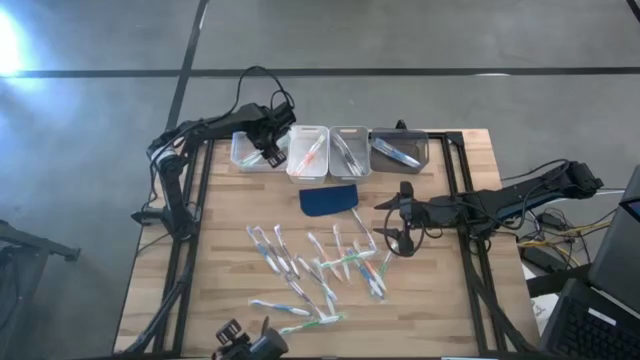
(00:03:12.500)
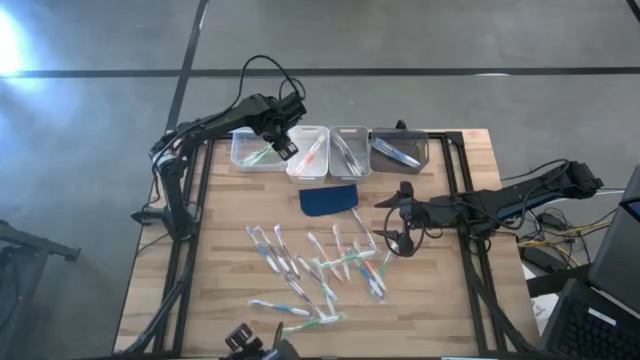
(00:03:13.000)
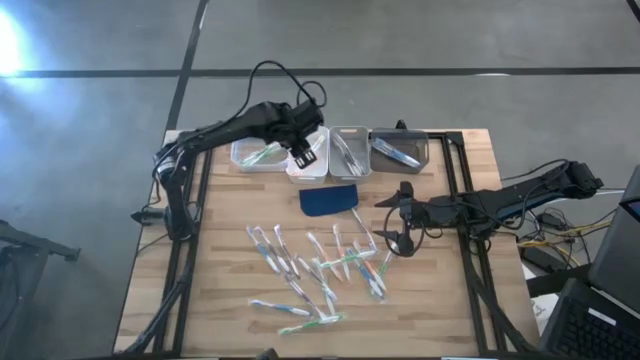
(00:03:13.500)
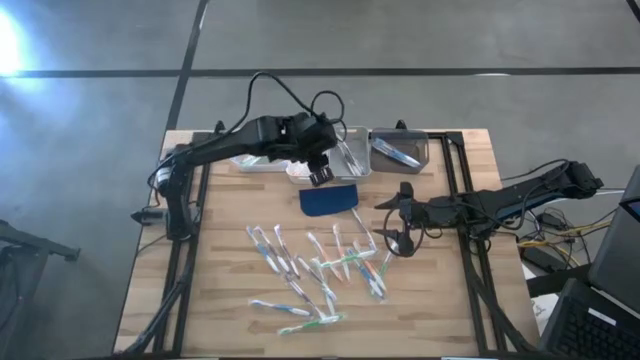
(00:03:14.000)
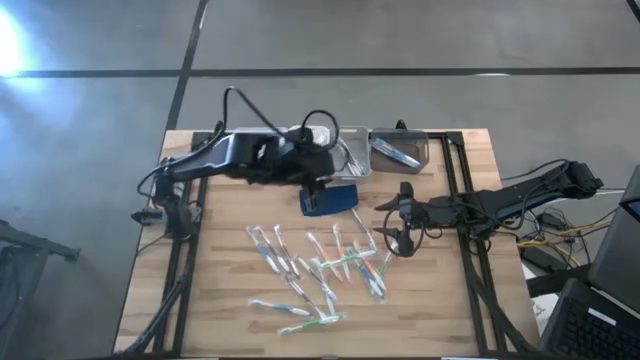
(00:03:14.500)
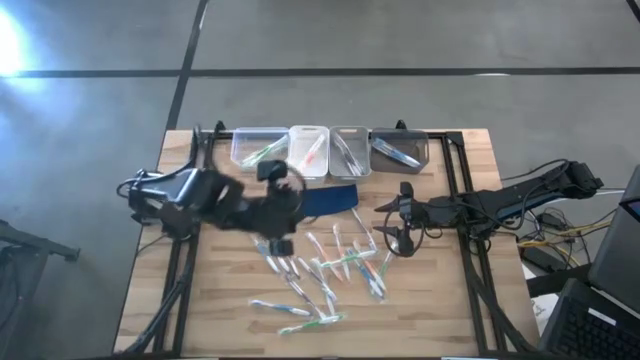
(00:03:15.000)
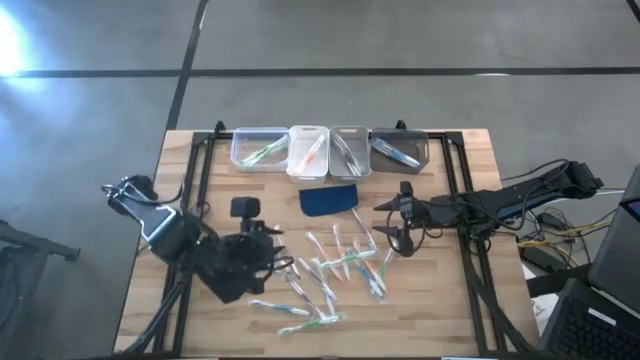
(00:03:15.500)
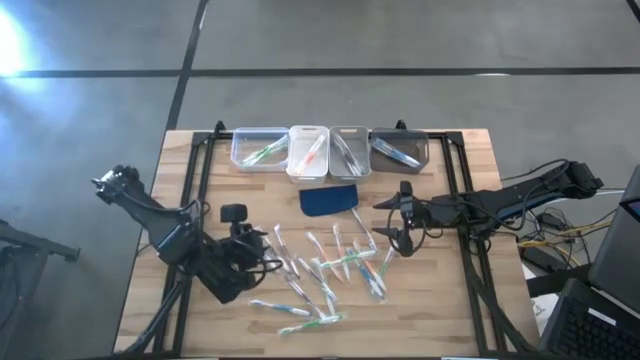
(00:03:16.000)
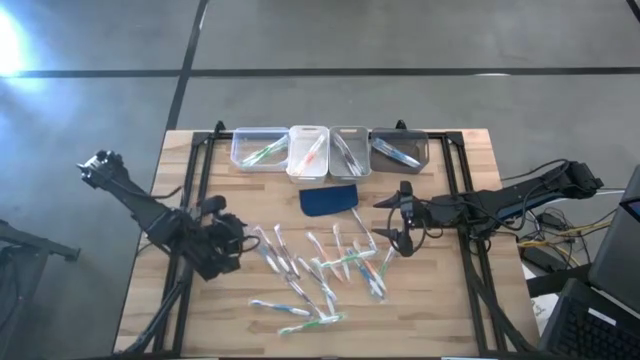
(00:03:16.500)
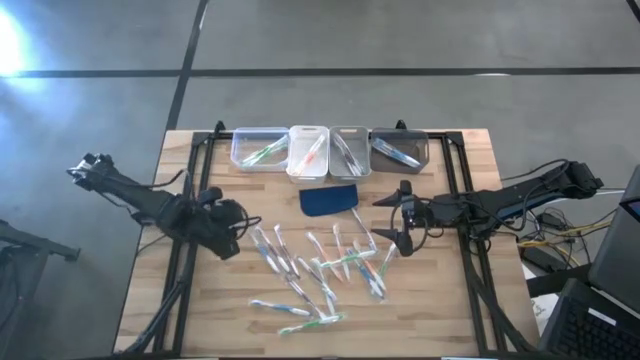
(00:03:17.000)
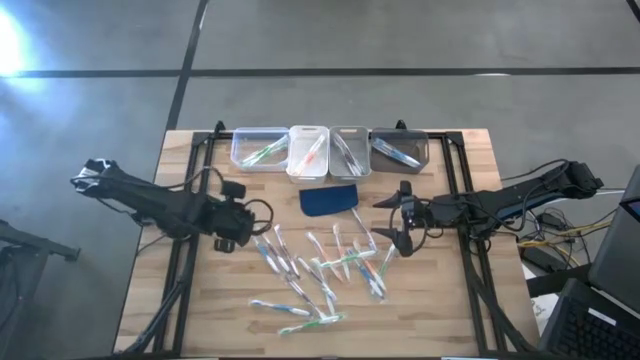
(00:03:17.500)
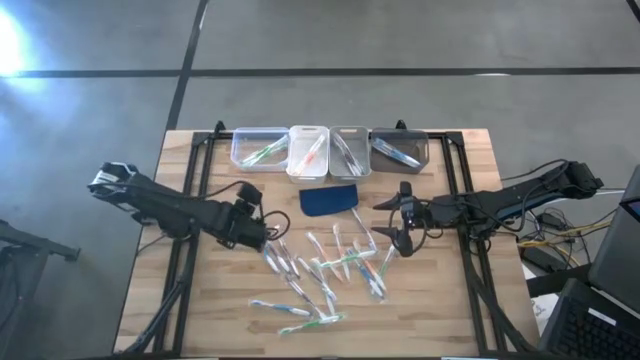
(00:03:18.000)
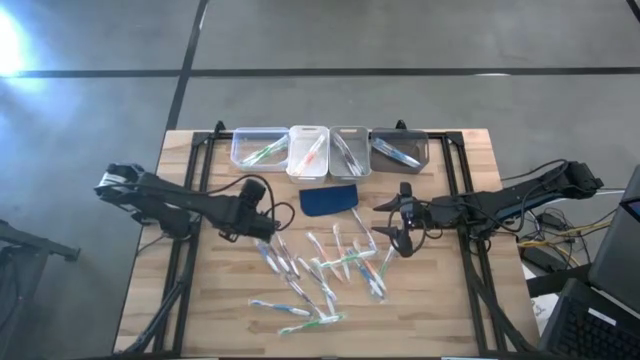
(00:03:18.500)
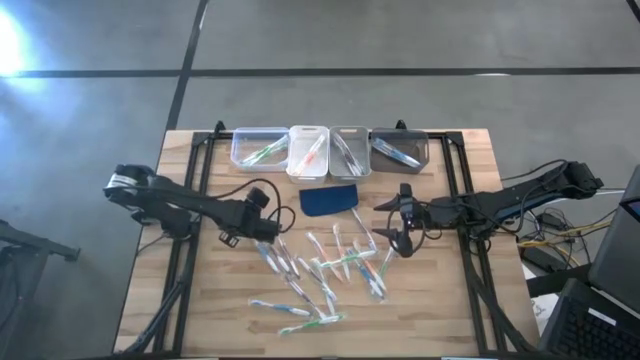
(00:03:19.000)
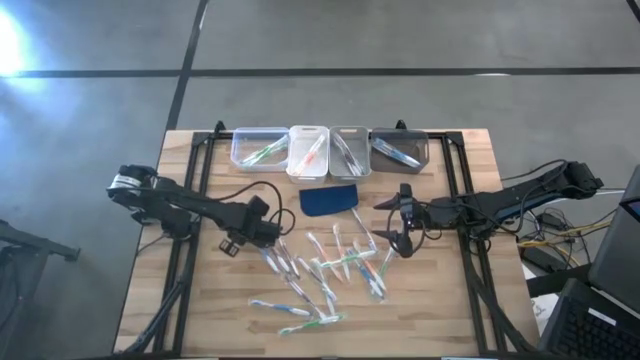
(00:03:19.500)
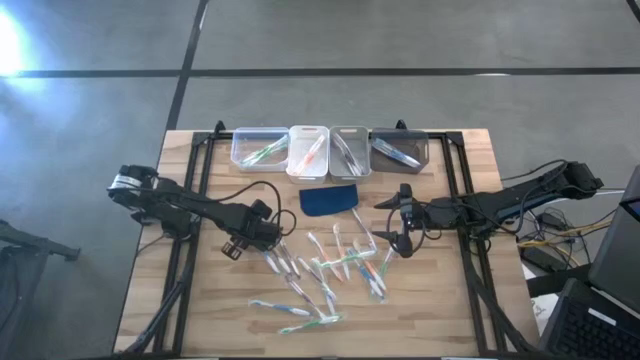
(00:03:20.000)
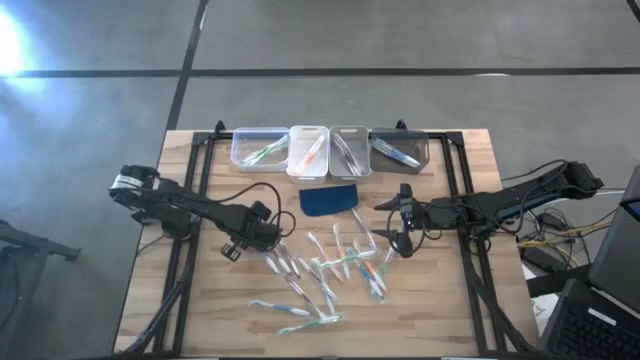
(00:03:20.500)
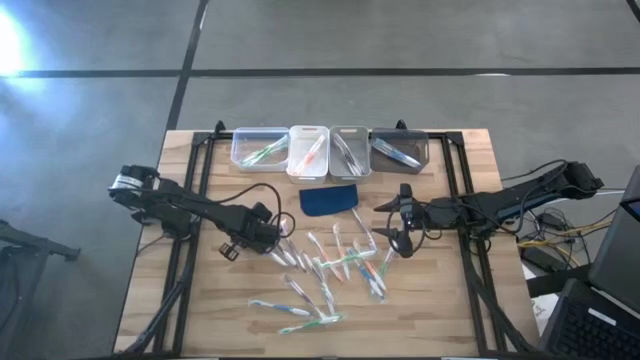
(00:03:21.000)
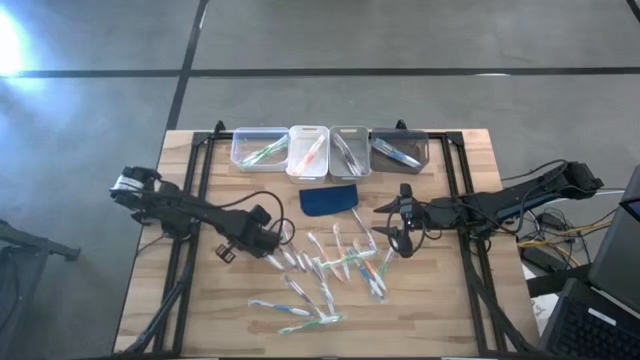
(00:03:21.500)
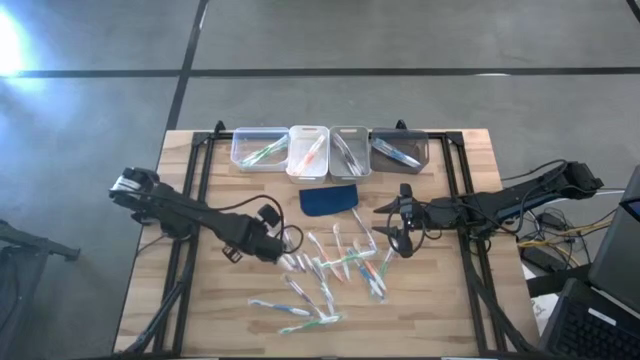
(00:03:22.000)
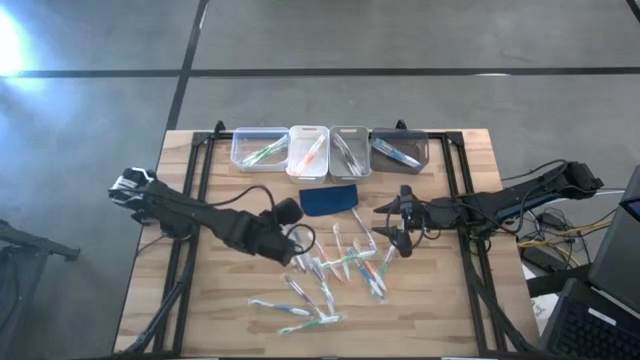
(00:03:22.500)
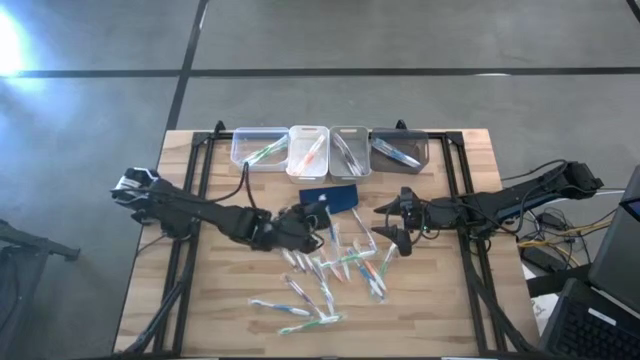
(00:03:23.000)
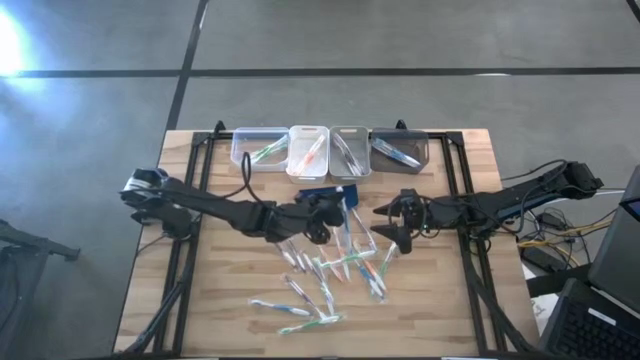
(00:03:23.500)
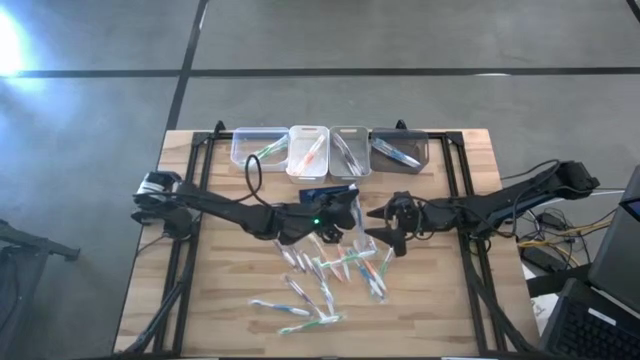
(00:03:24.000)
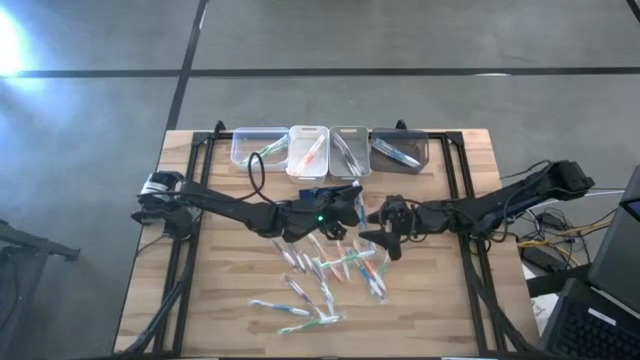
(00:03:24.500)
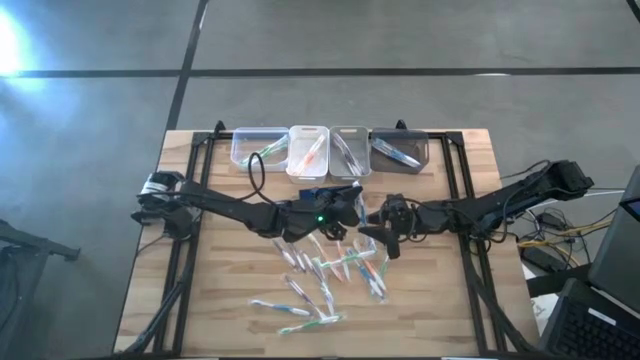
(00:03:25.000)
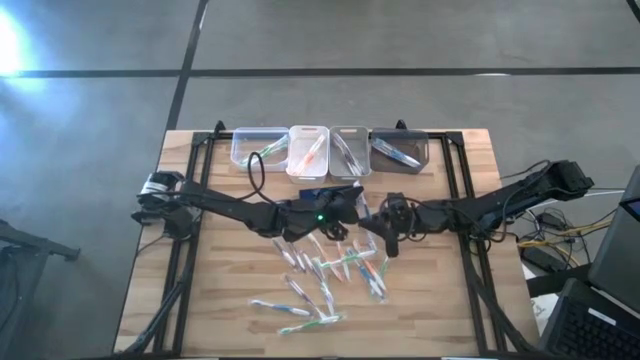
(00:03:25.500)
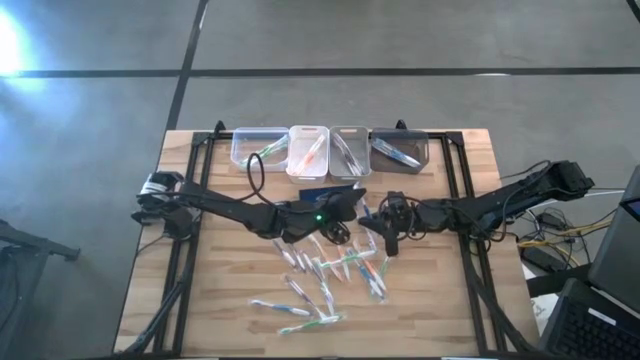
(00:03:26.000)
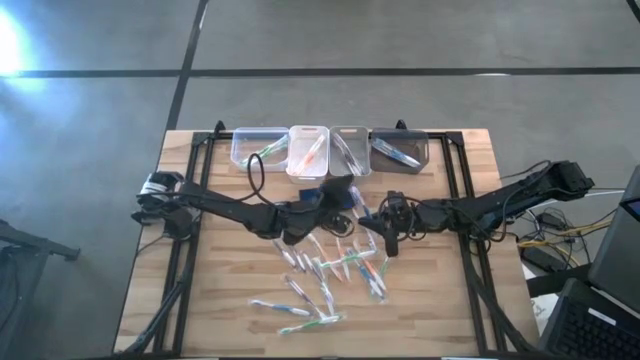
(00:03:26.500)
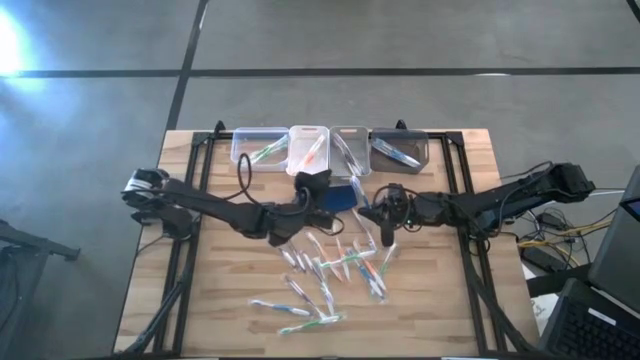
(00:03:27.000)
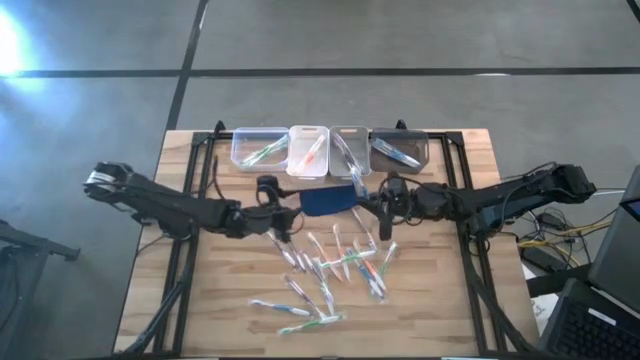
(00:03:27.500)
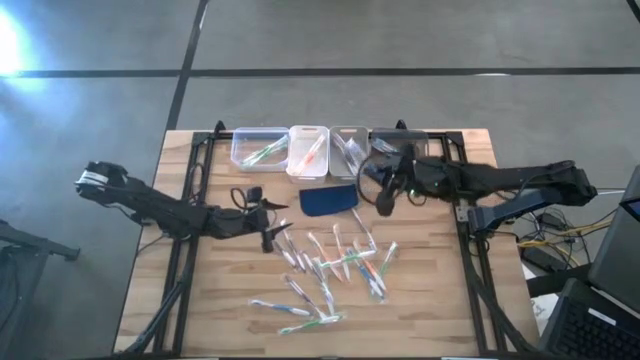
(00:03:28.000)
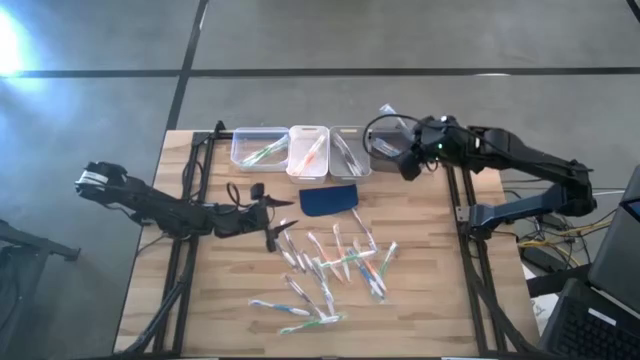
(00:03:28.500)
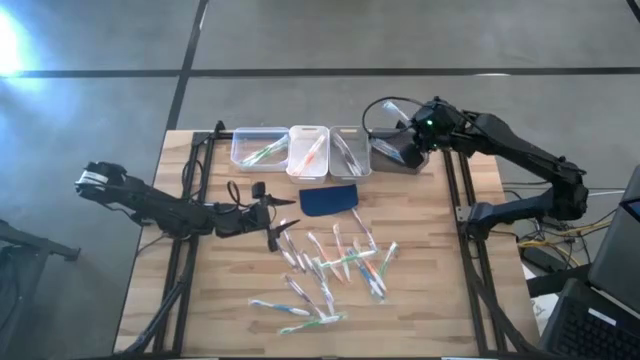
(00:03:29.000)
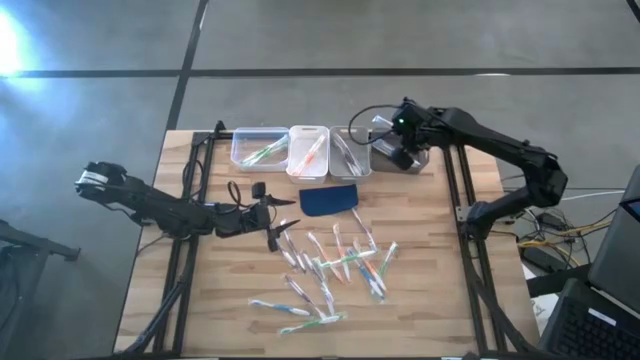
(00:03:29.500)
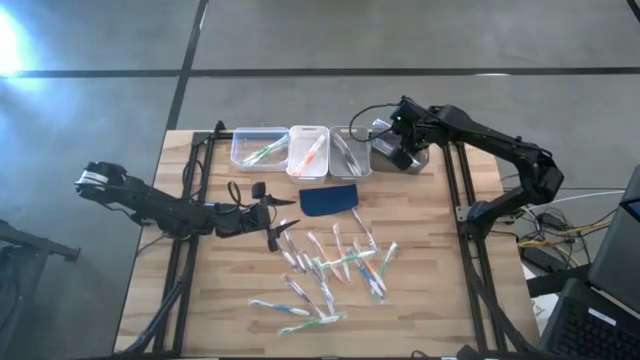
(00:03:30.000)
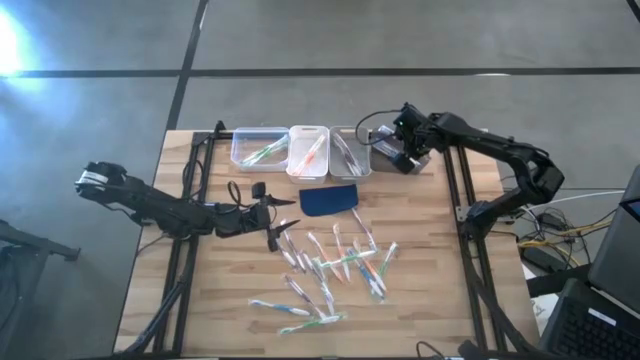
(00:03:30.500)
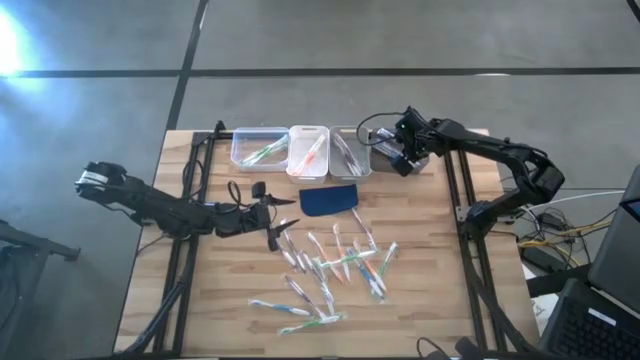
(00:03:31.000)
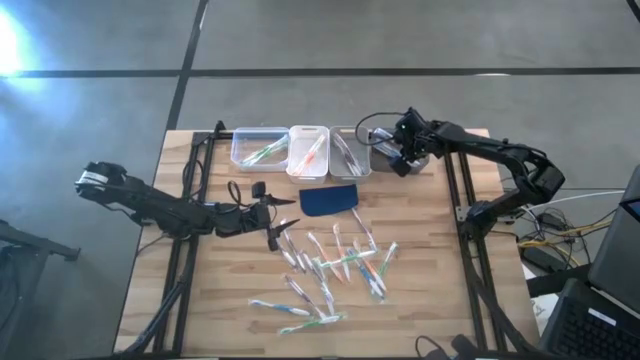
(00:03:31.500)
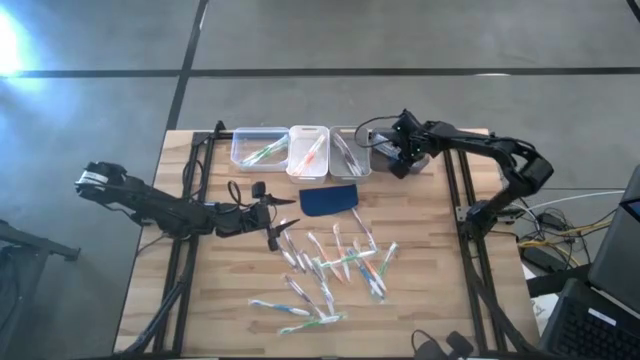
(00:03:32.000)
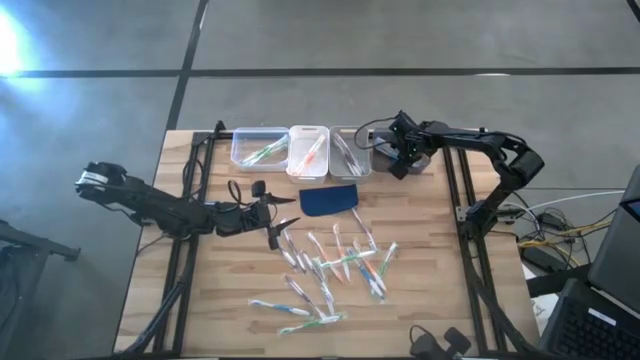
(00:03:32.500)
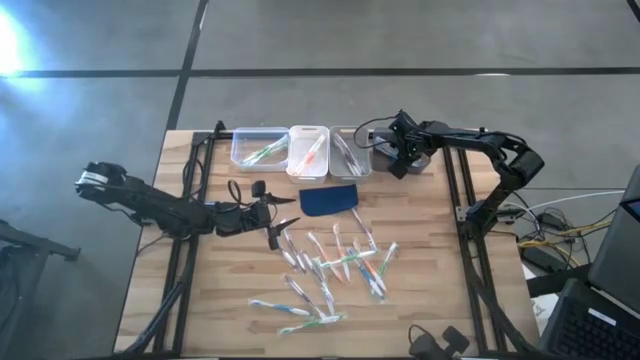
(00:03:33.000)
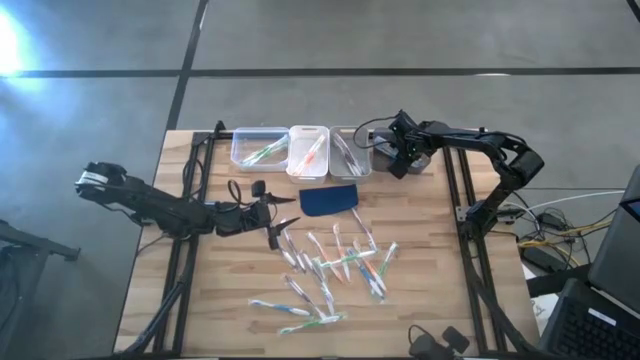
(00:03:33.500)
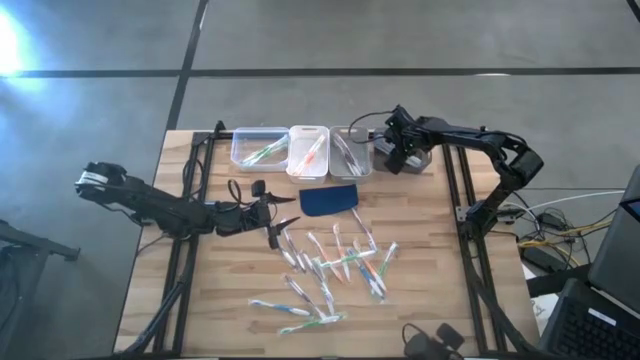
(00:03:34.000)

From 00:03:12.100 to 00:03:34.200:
Task: Pick & Place Toothbrushes
Put the blue toothbrush into the transparent black bin
